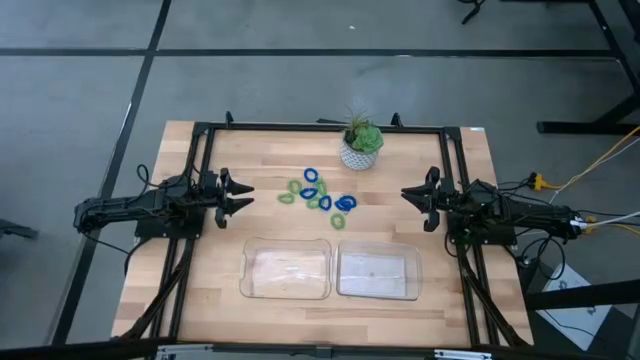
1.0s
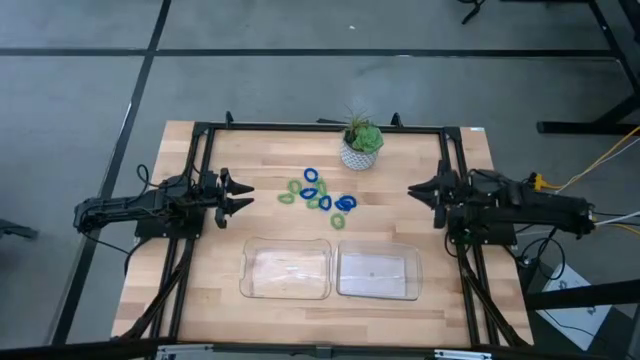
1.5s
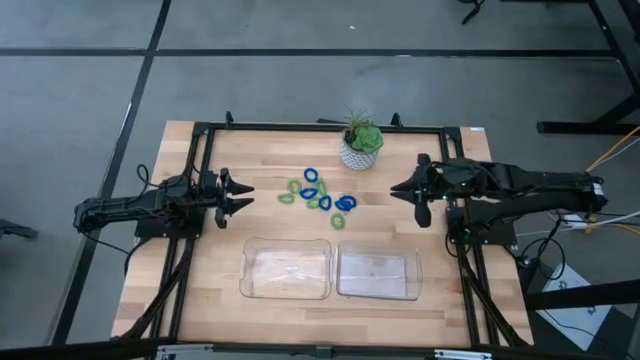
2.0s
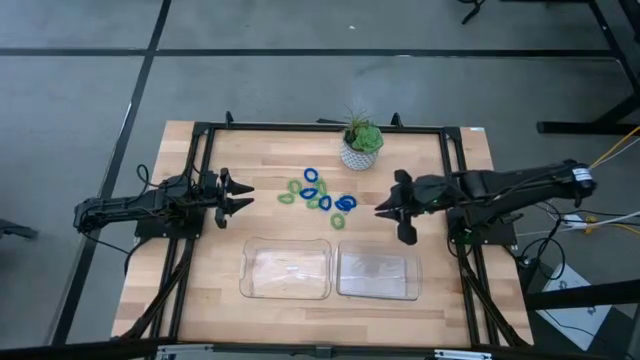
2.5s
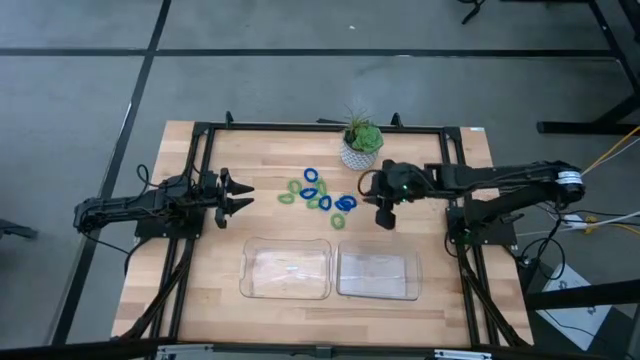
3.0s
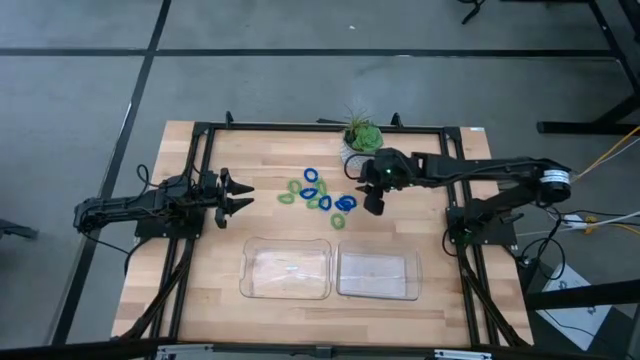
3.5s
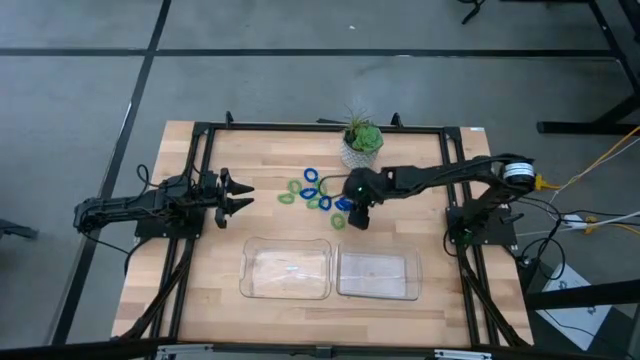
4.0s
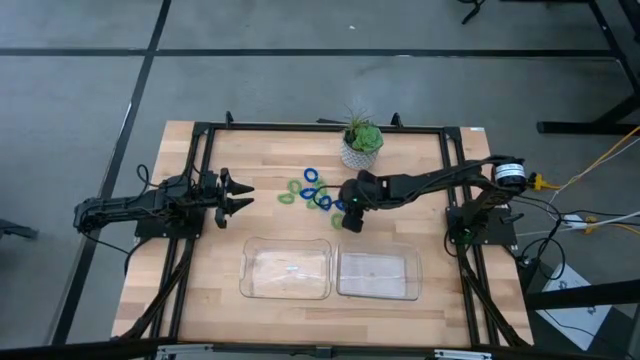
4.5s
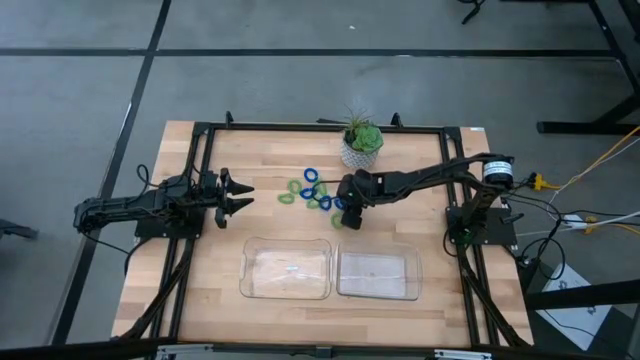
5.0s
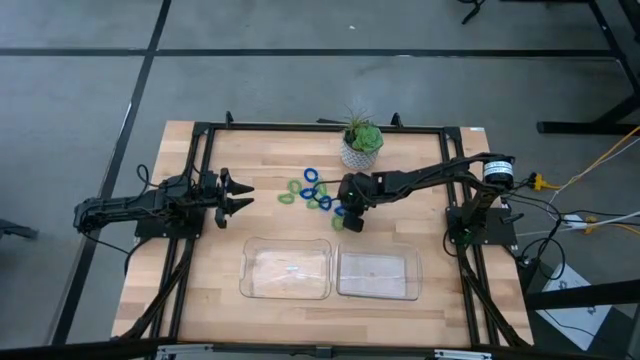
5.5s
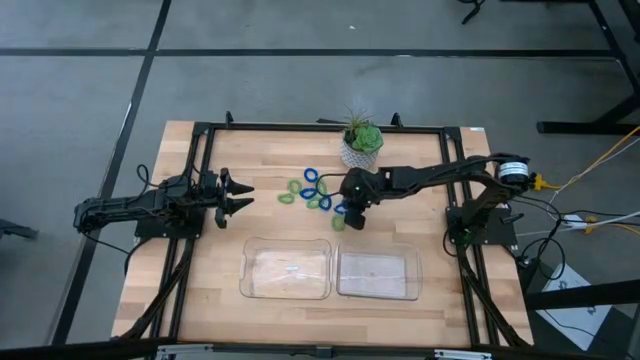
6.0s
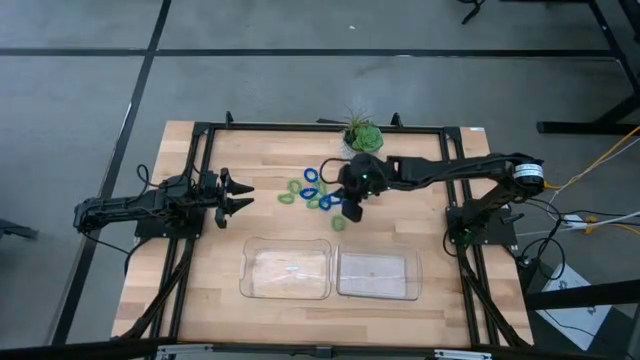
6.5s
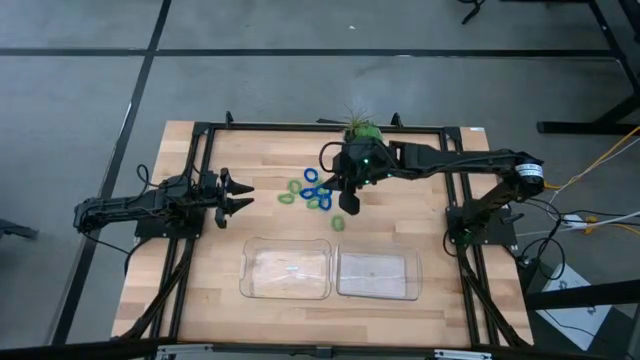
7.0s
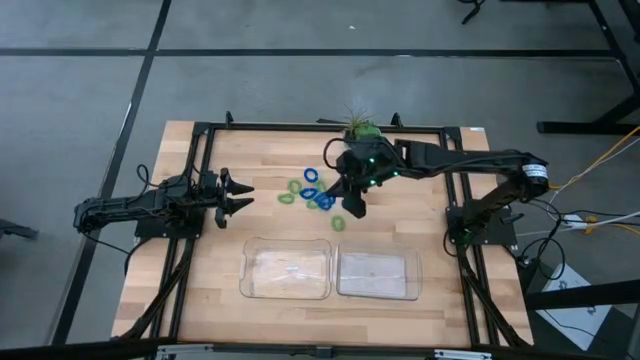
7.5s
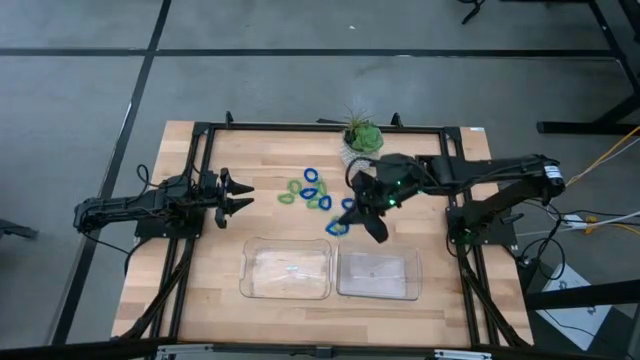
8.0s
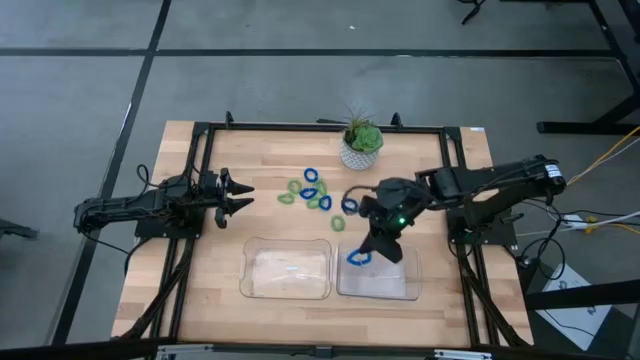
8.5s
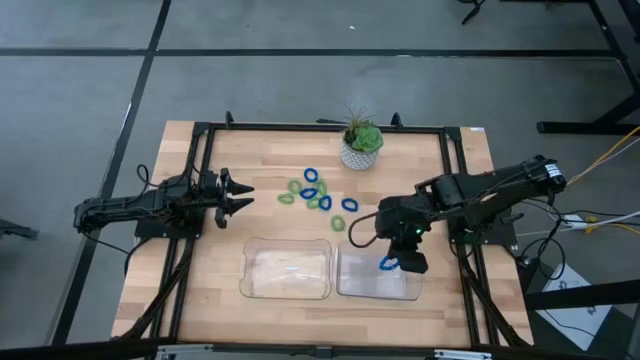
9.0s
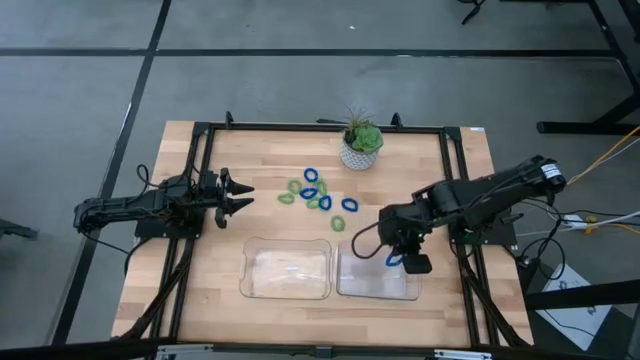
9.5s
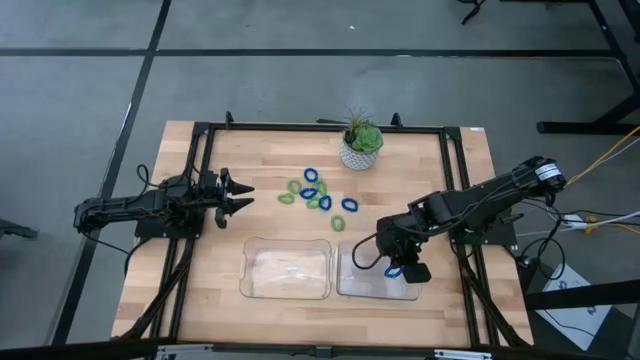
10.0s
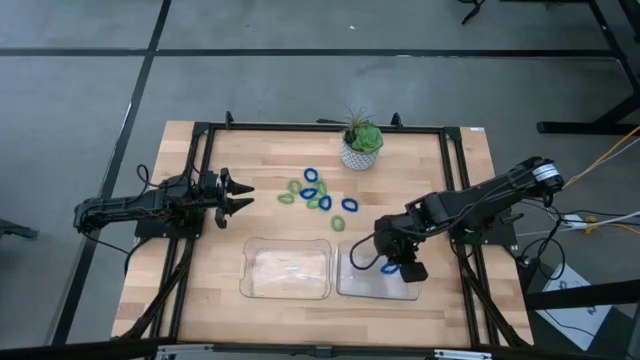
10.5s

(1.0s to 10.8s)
Task: Sort spring keychains
Put the blue spring keychain into the right transparent bin

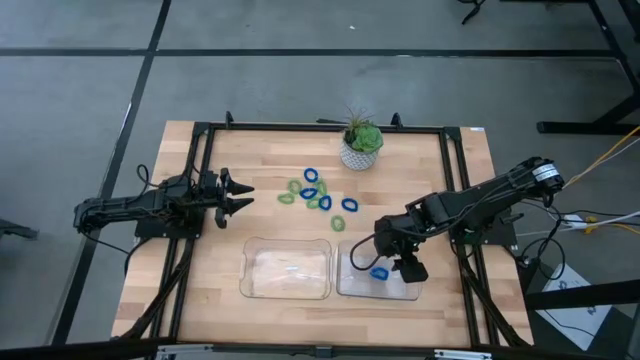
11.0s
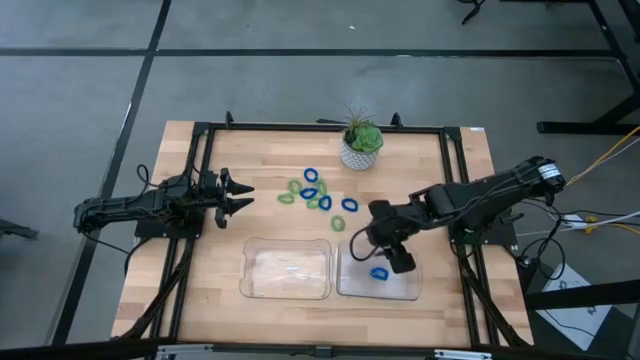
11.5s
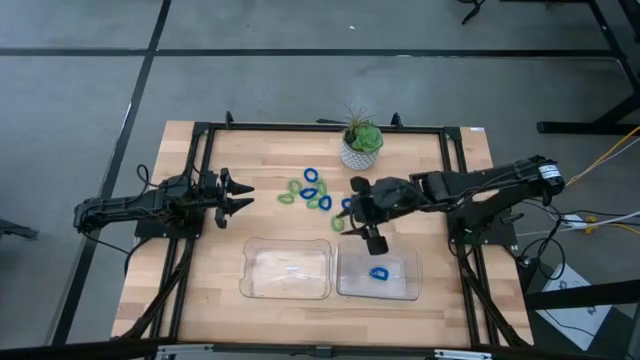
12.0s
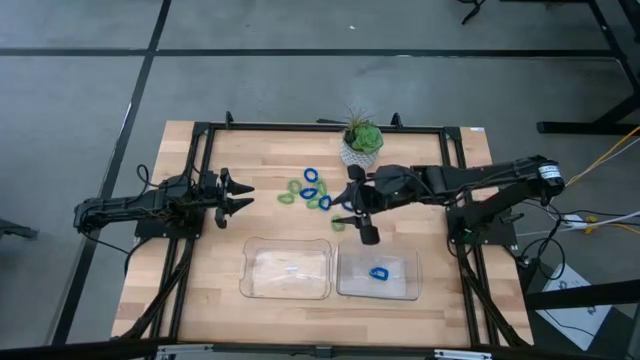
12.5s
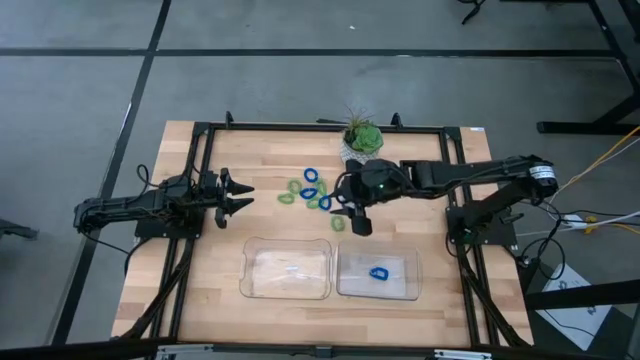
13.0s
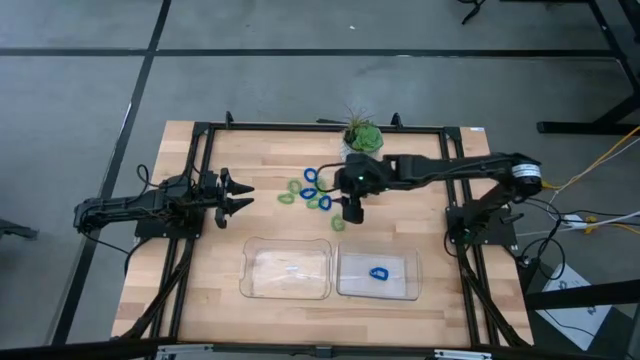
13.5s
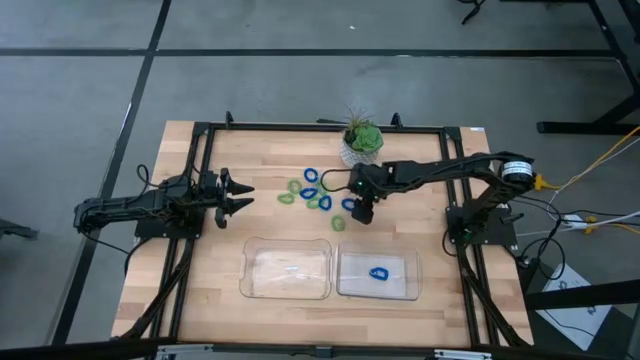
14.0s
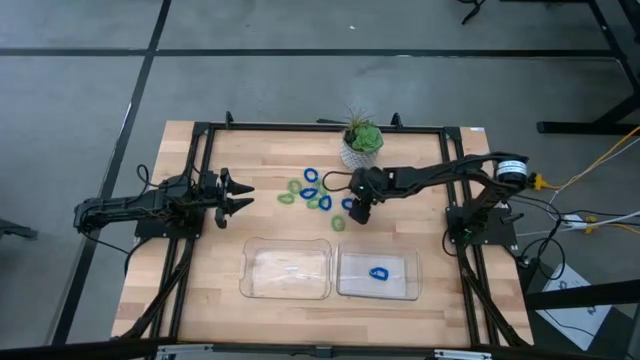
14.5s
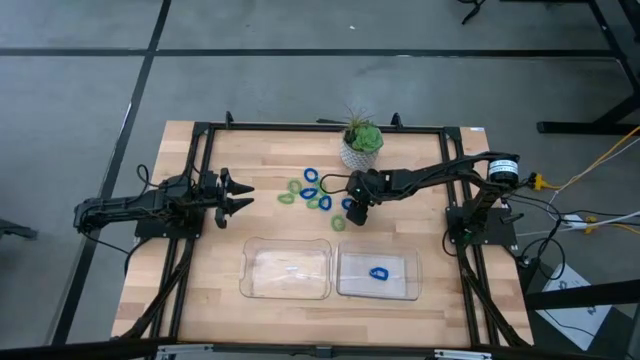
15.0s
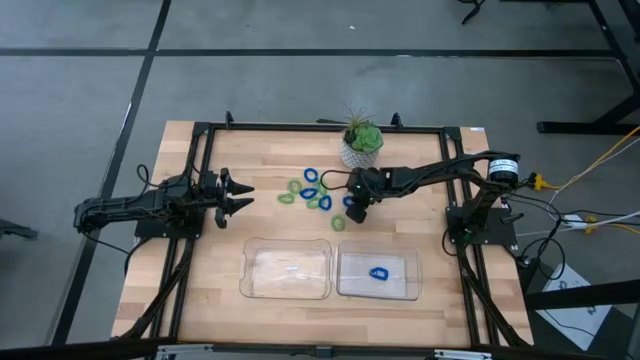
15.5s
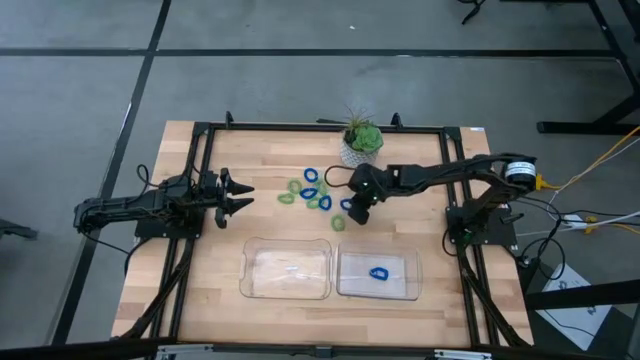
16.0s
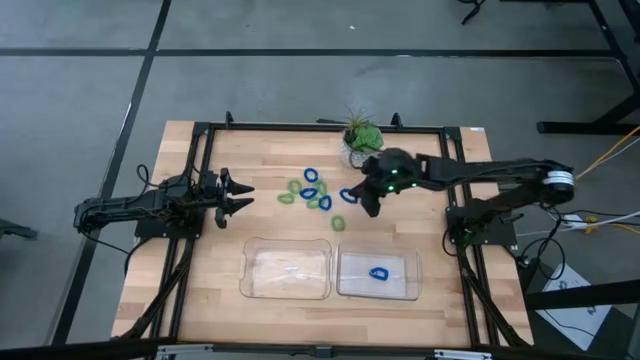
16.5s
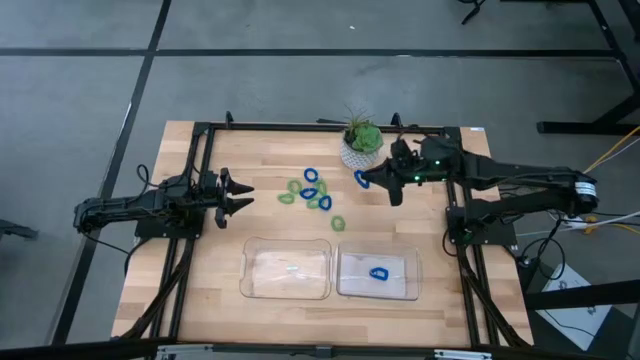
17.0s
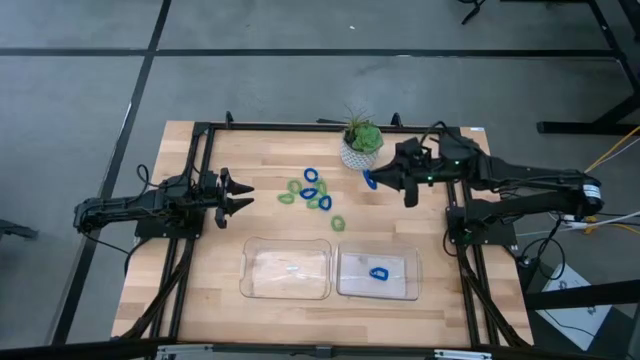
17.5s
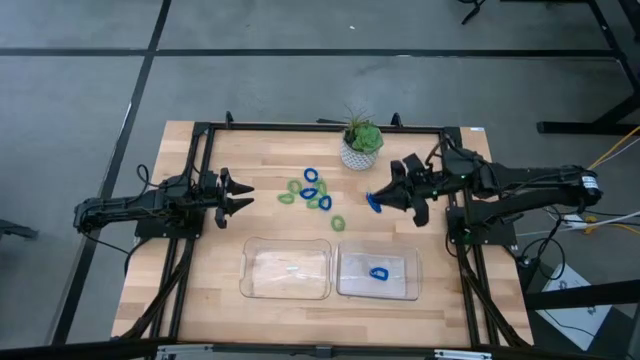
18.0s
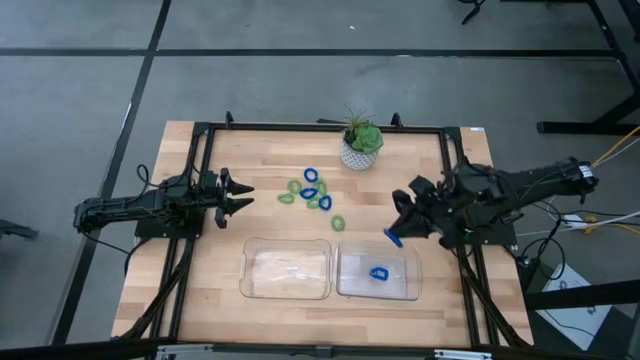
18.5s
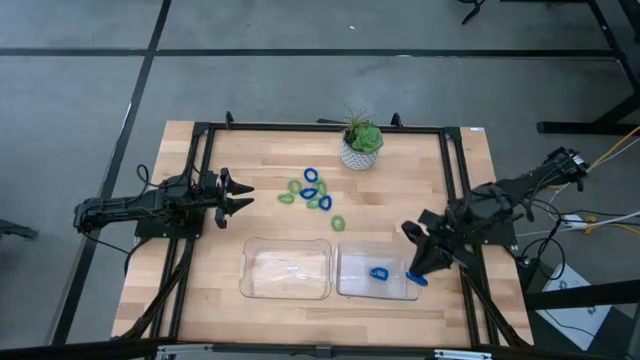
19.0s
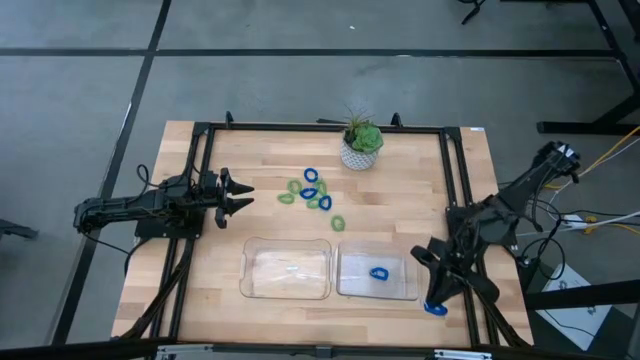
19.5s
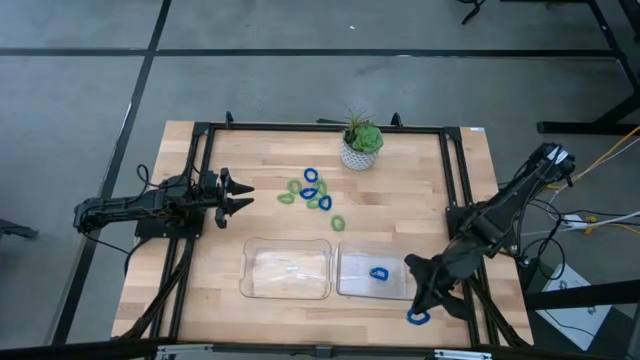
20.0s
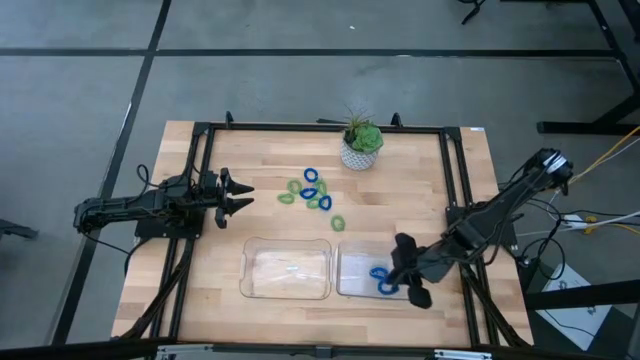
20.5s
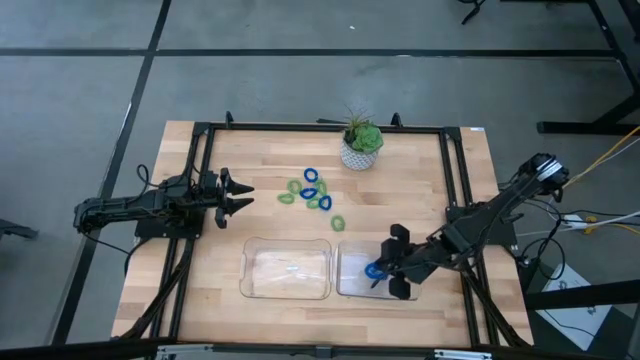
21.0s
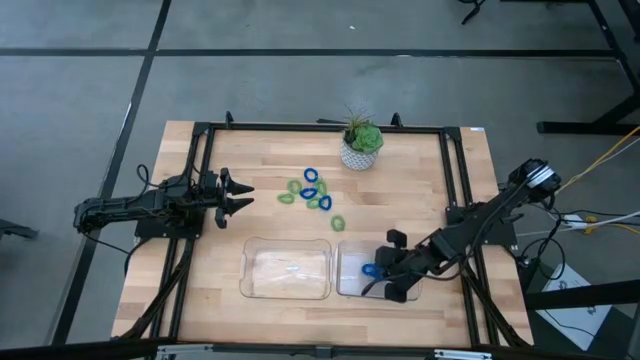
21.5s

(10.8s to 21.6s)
Put the blue spring keychain into the right transparent bin
